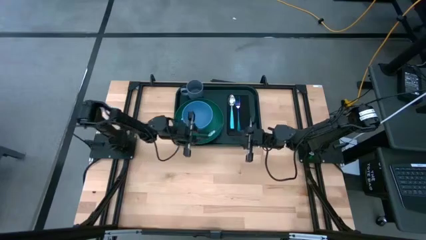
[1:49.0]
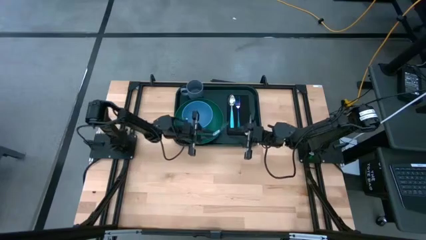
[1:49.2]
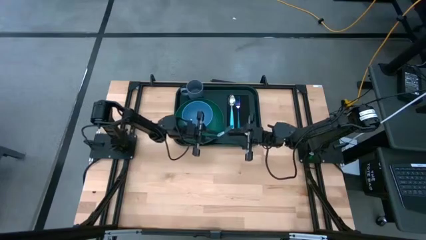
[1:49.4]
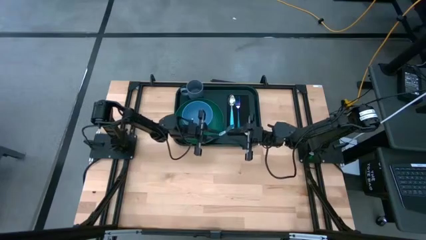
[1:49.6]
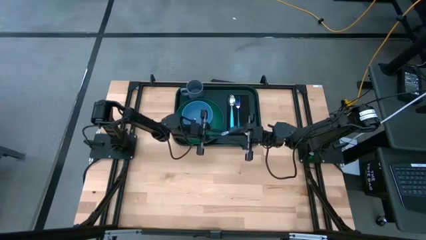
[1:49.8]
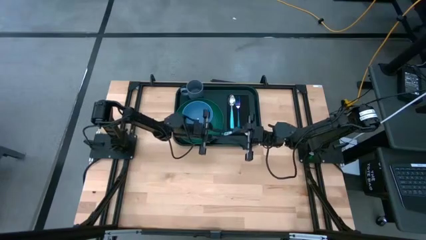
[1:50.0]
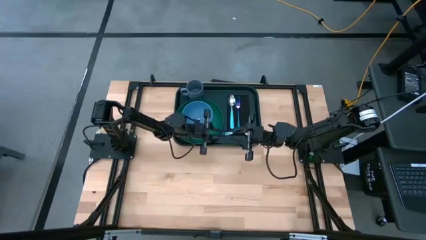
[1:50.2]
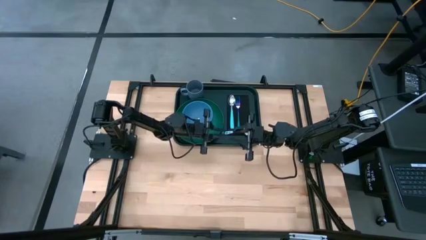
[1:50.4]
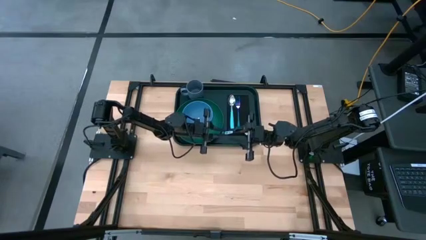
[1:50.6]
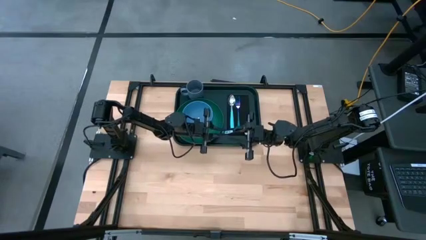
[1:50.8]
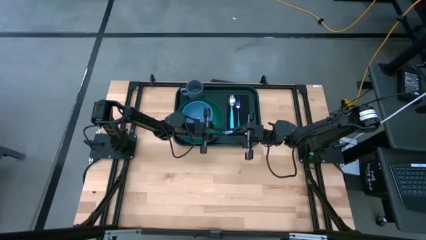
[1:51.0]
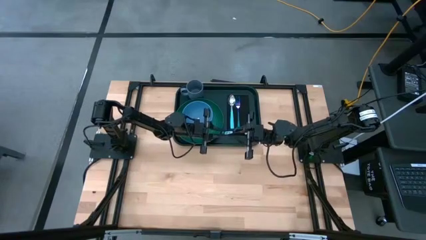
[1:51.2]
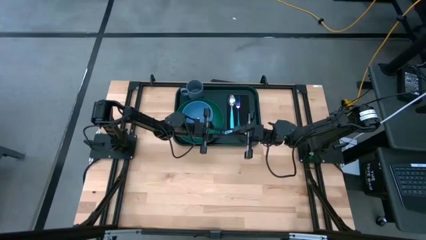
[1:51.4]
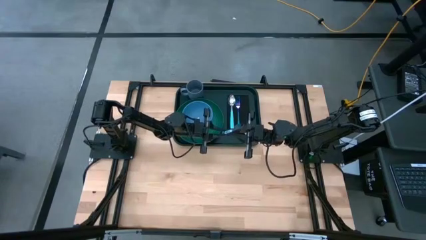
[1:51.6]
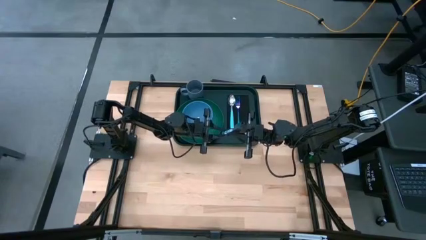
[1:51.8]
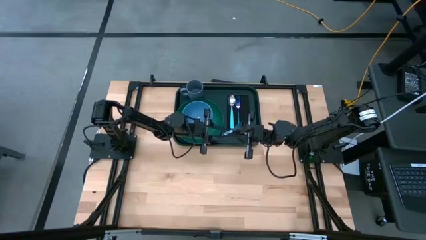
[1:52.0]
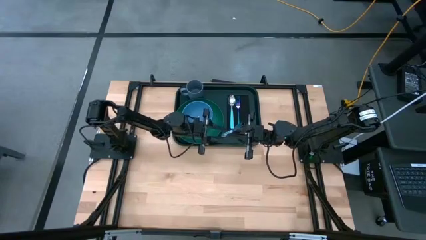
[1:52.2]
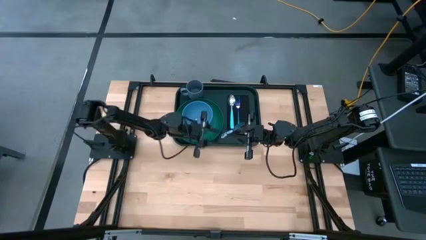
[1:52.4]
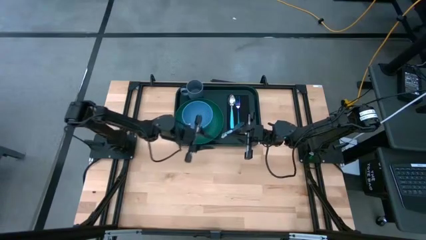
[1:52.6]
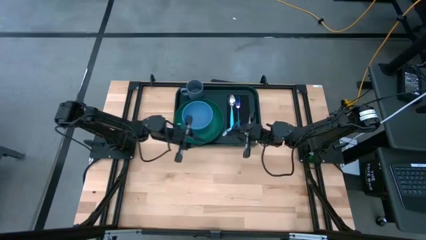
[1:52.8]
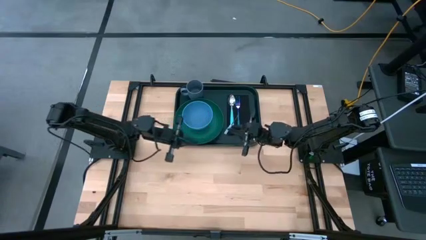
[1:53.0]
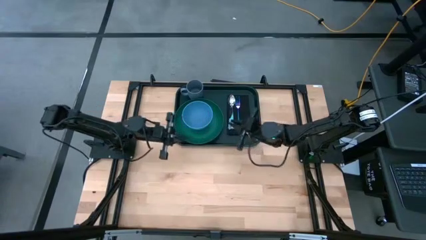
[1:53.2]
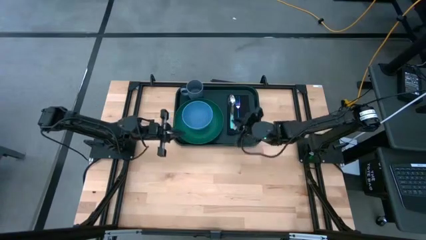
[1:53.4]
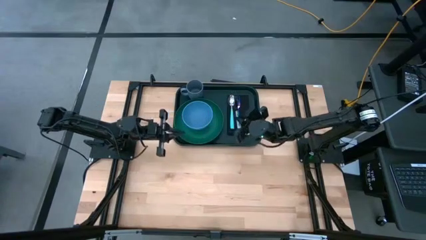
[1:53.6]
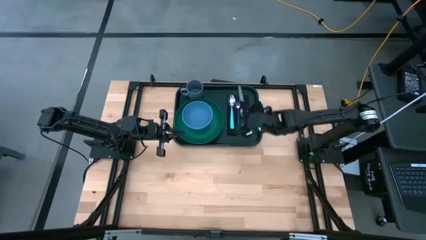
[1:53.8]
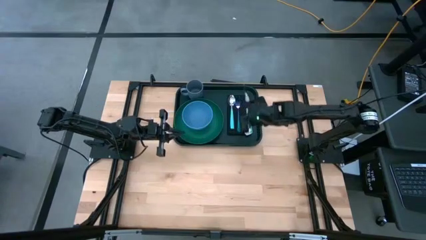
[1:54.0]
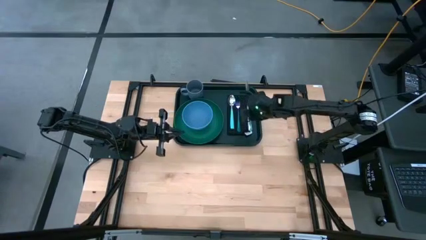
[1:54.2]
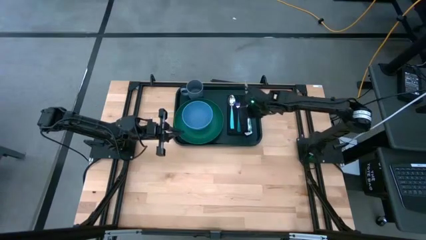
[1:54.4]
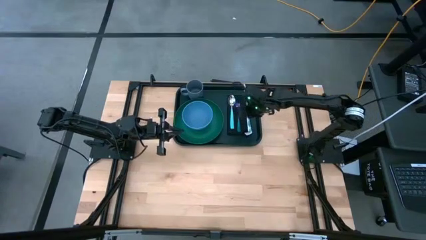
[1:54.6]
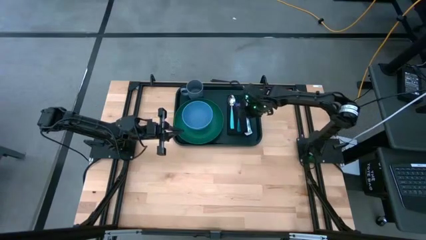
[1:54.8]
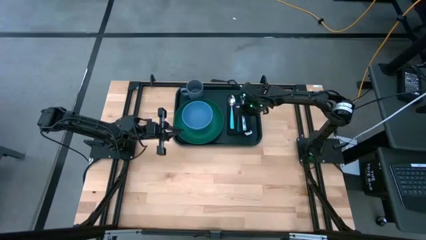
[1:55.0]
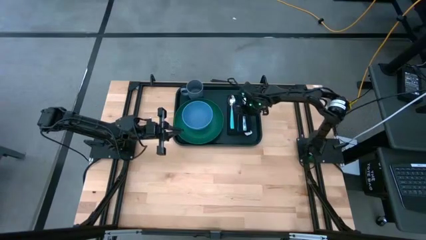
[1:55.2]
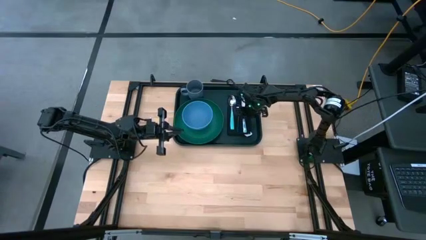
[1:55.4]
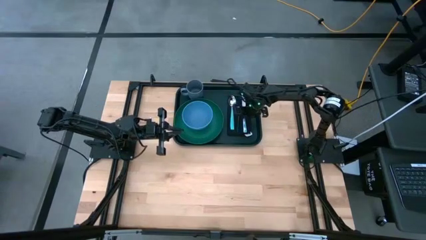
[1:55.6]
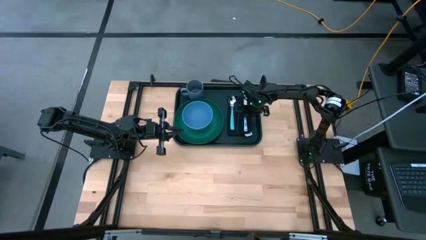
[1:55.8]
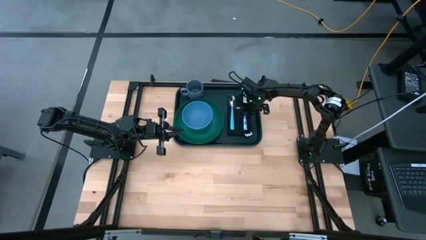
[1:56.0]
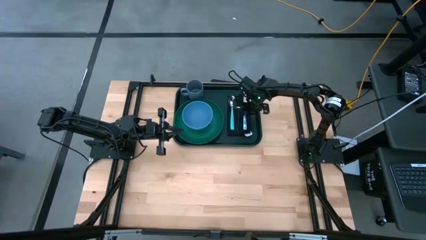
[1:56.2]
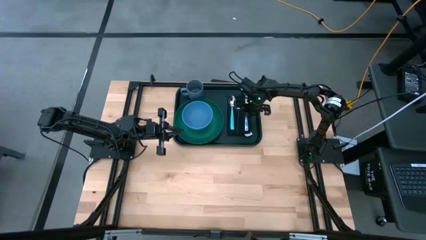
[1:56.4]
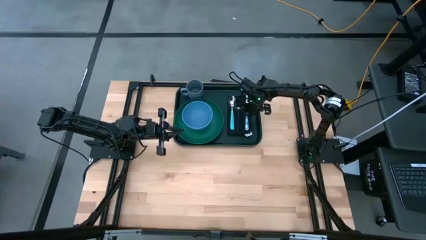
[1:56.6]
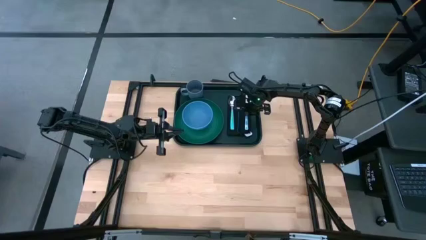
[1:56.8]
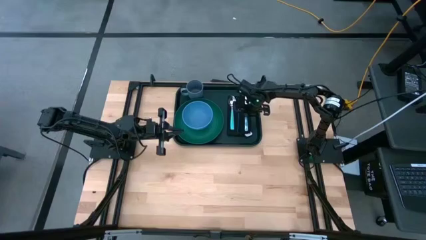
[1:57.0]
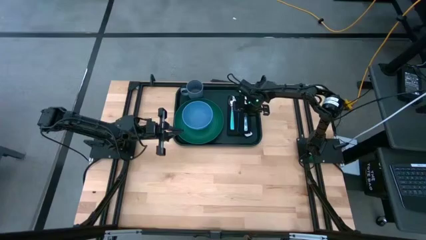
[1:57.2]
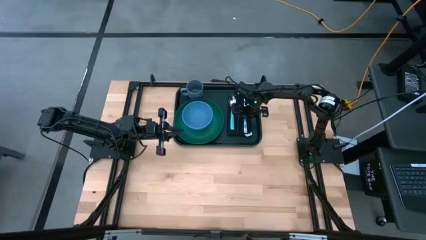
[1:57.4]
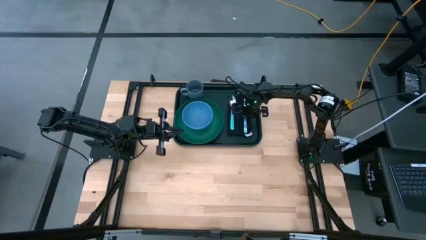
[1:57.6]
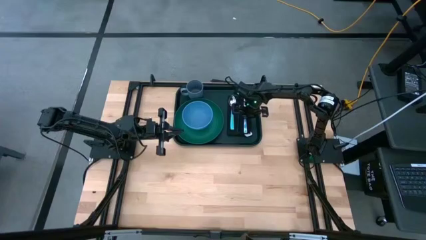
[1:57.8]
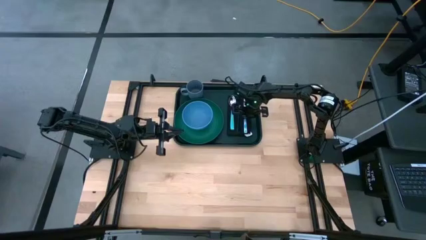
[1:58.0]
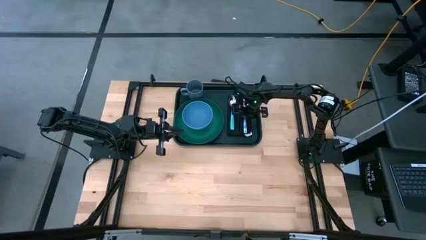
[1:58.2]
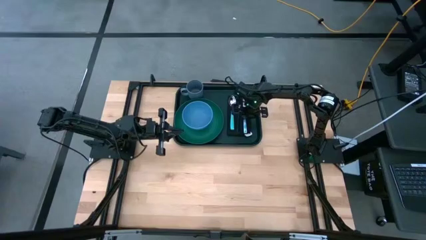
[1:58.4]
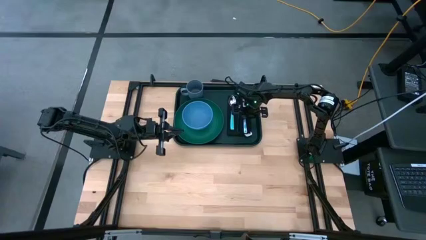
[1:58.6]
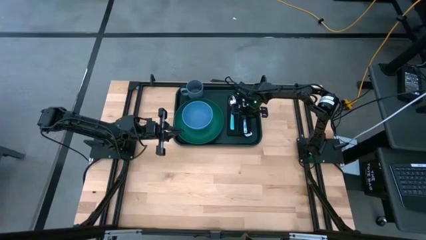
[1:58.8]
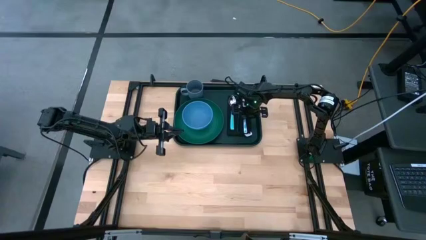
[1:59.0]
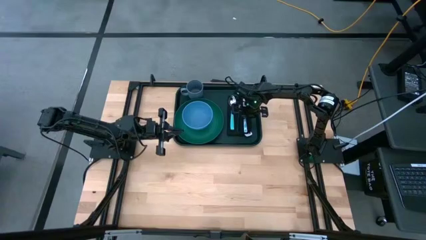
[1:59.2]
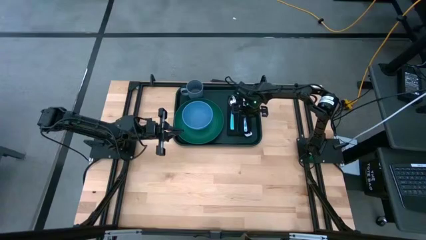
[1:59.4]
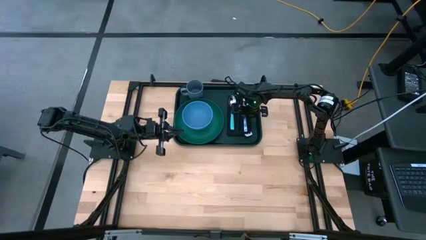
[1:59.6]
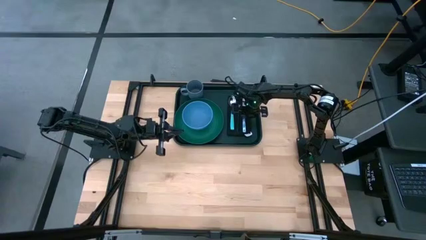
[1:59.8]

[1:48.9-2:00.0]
Task: Set up tray
Put the blue knife on top of the black napkin on the green tray

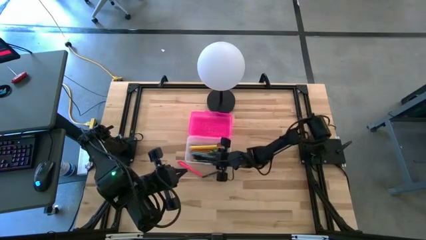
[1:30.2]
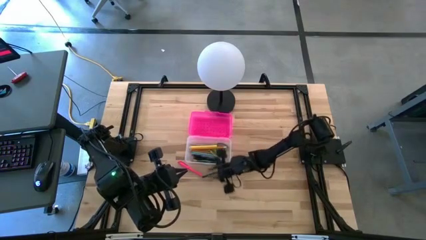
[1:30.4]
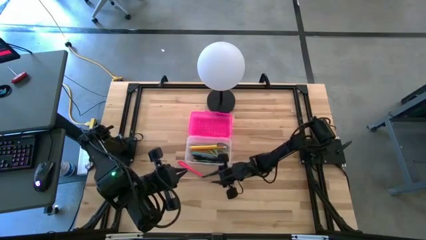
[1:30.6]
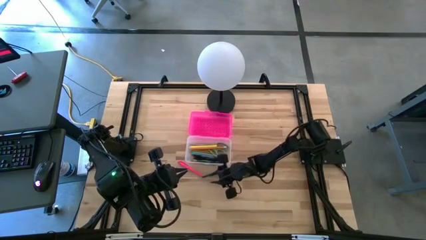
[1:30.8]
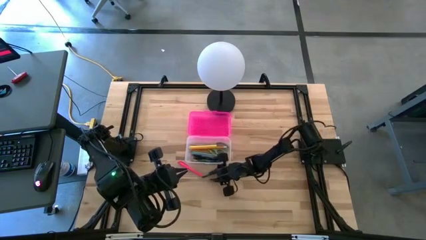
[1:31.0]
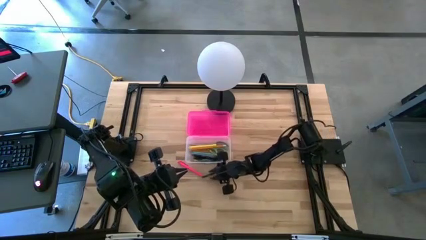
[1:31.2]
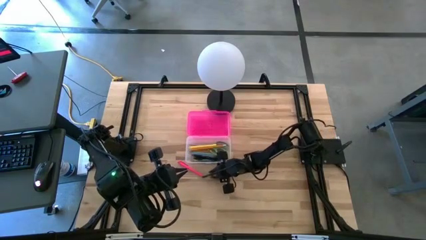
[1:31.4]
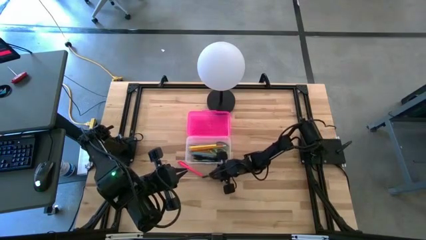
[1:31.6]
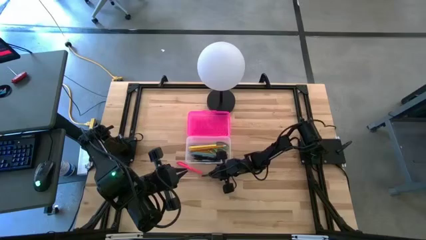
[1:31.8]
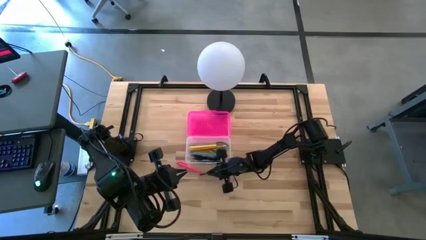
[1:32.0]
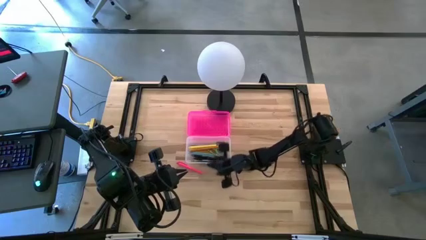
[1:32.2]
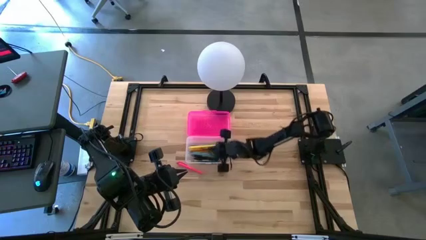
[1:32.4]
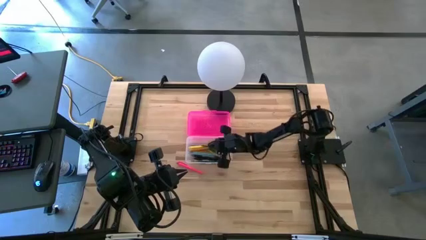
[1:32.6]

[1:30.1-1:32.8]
Task: Pick & place school supplies into a supply box
Put the green crayon into the pink supply box
